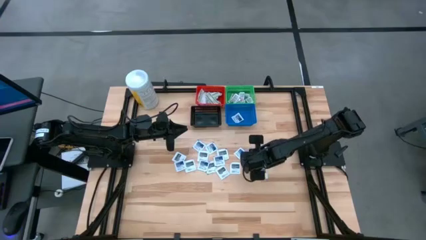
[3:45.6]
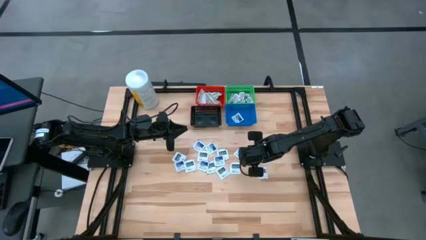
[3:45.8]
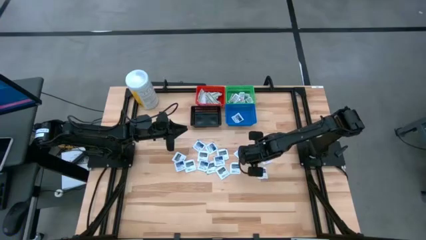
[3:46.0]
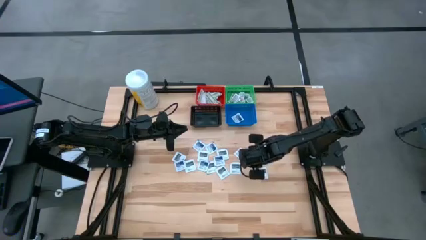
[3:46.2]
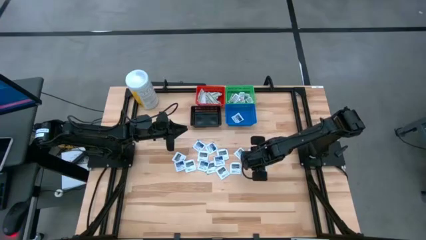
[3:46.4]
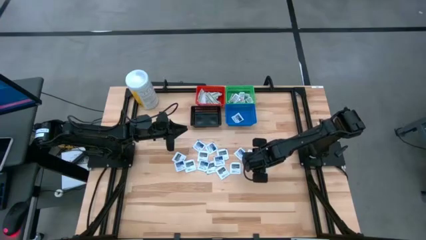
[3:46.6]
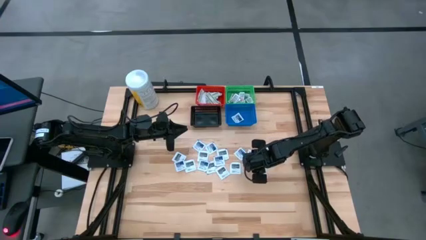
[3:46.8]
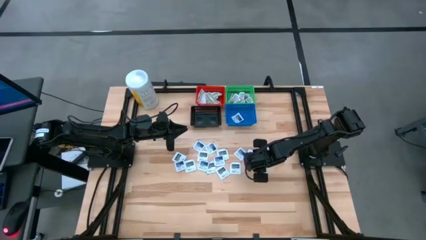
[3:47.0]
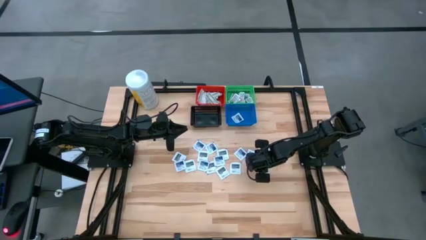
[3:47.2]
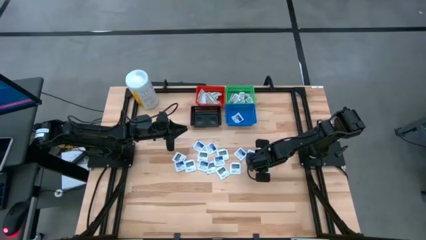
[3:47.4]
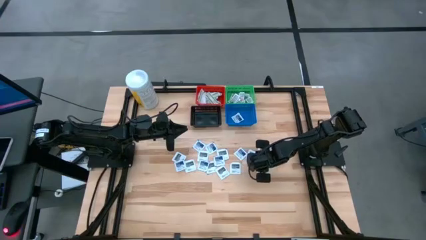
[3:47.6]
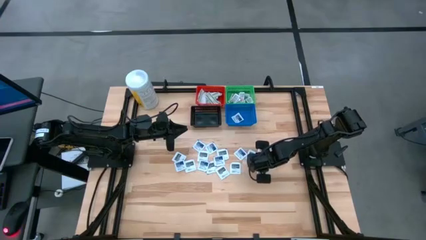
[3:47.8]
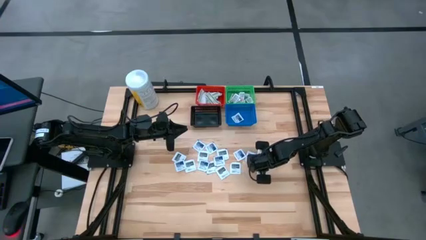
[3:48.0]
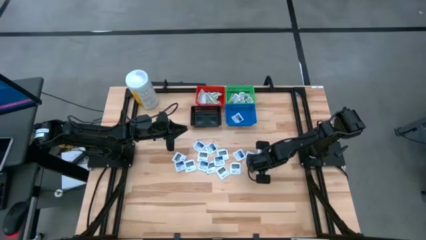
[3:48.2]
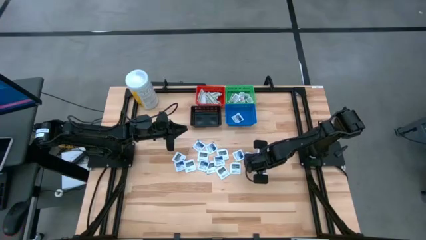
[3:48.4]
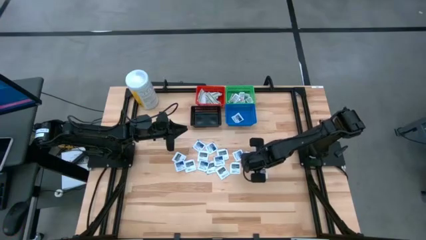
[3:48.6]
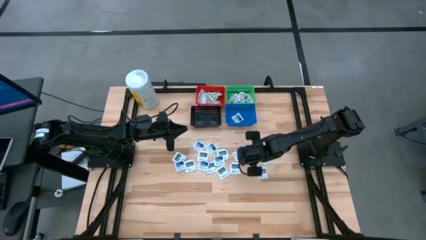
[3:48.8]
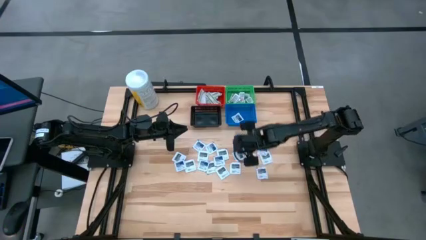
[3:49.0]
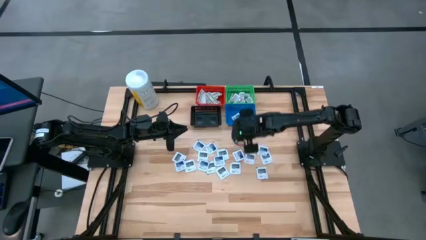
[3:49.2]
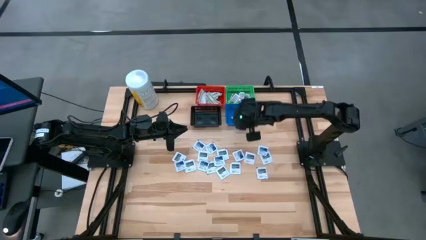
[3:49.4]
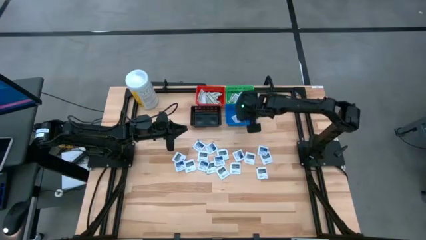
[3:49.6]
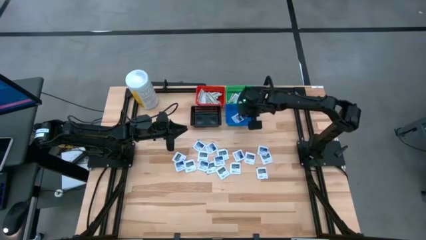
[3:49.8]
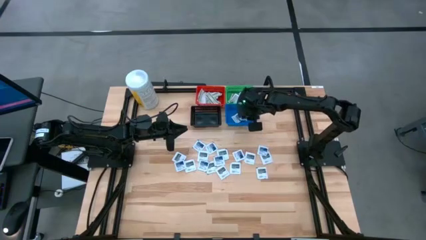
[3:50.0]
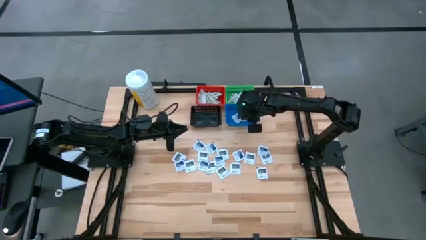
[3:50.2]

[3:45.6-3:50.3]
Task: Pick & Place First Aid Supplies
Put the alcohol pad into the blue basket

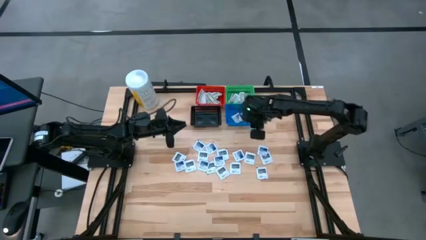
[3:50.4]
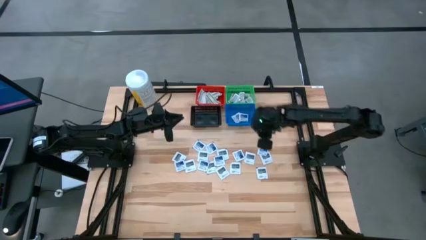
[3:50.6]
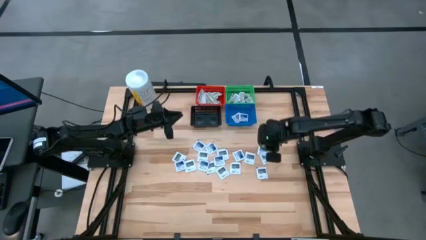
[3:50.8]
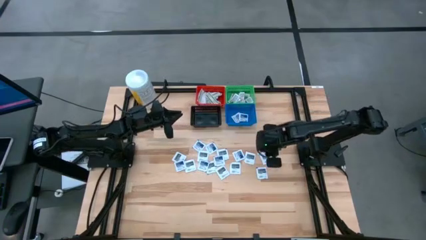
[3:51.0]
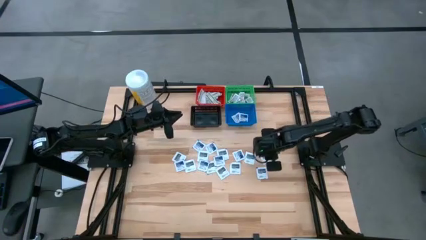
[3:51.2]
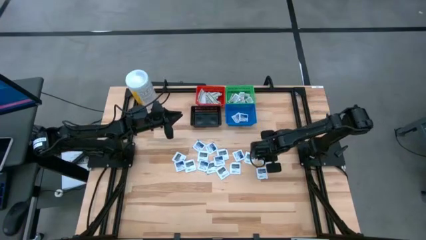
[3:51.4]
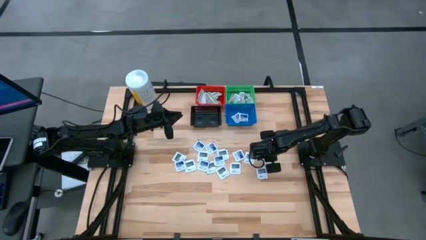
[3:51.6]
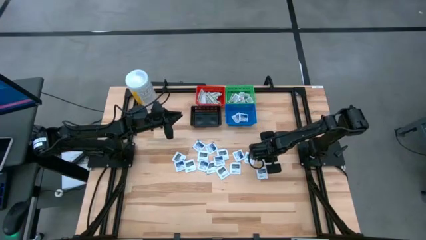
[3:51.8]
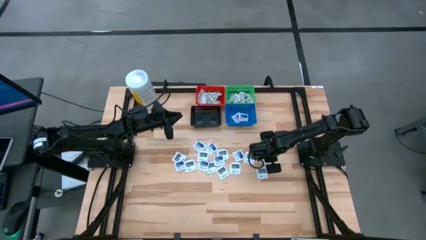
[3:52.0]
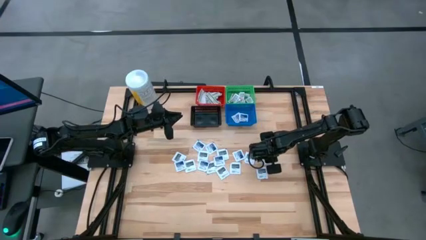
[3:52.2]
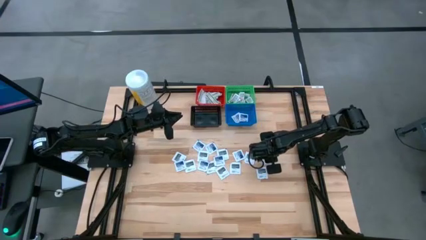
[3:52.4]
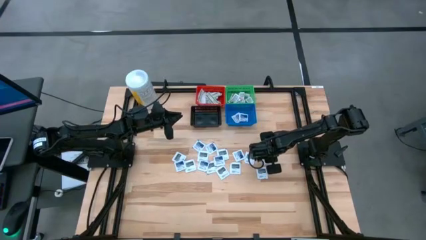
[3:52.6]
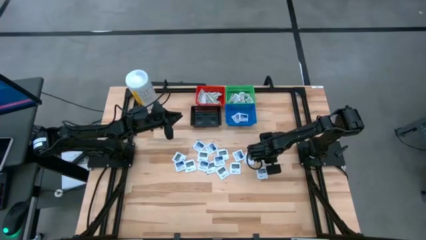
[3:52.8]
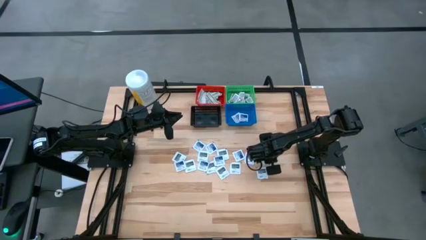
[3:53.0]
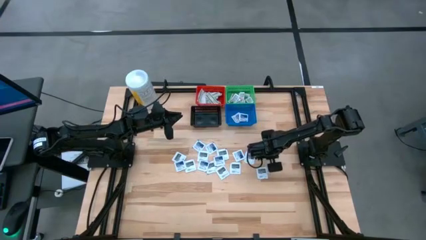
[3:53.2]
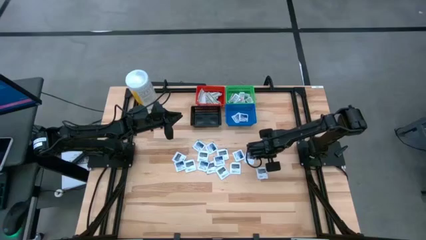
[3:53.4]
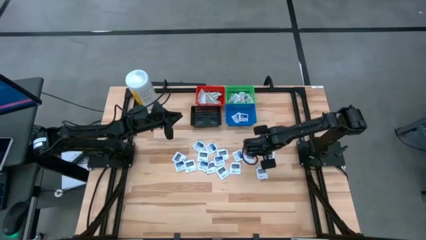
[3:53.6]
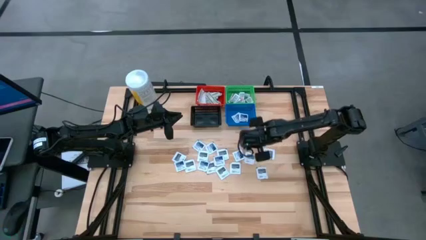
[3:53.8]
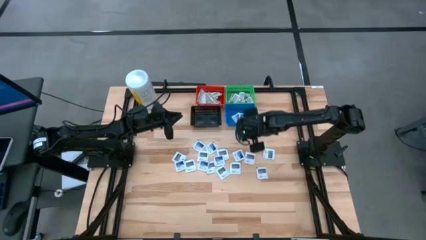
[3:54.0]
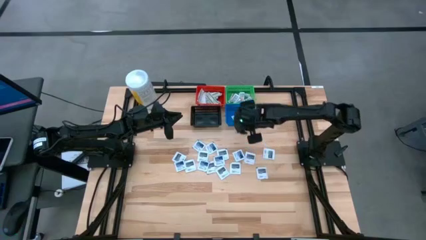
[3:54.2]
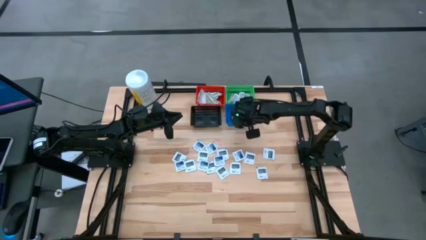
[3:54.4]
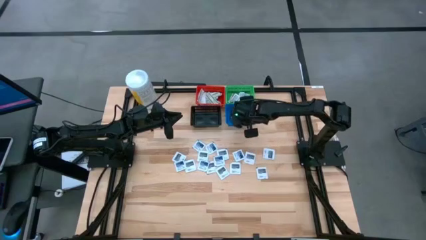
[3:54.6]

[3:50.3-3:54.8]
Put the alcohol pad into the blue basket

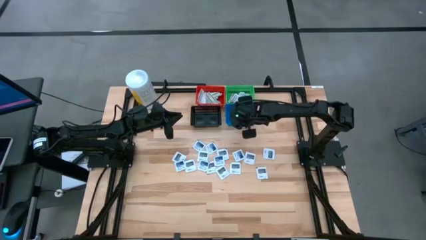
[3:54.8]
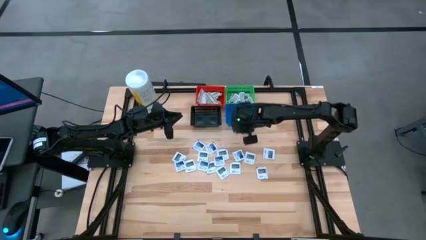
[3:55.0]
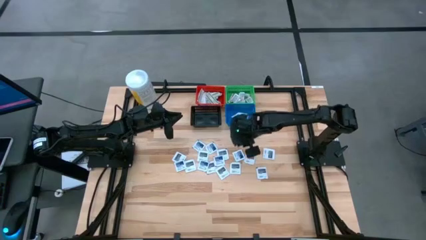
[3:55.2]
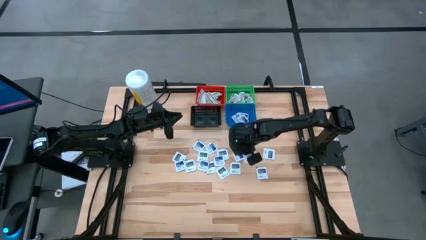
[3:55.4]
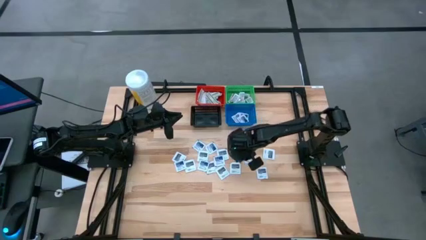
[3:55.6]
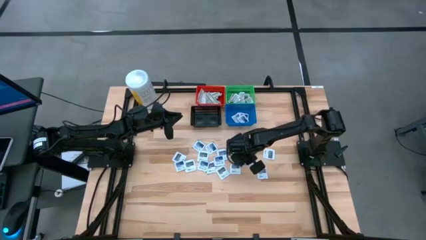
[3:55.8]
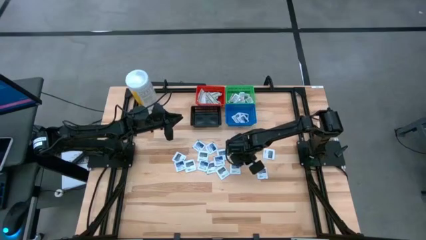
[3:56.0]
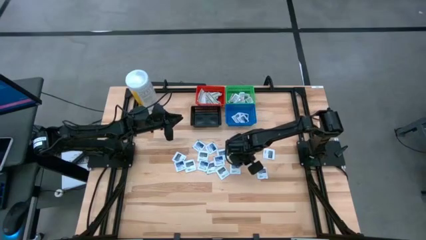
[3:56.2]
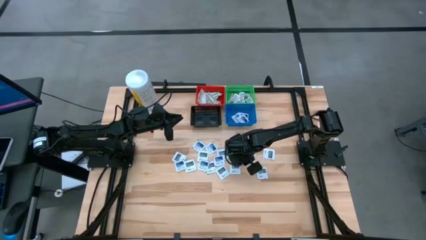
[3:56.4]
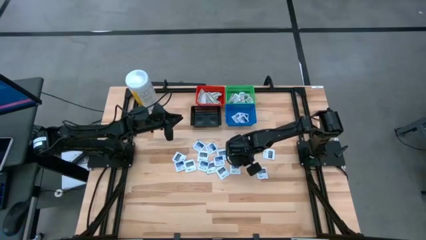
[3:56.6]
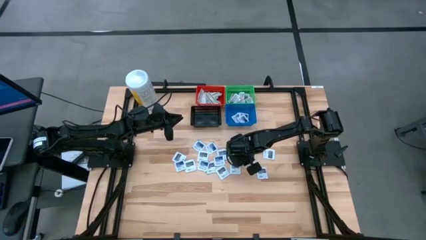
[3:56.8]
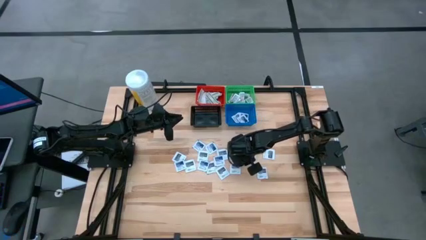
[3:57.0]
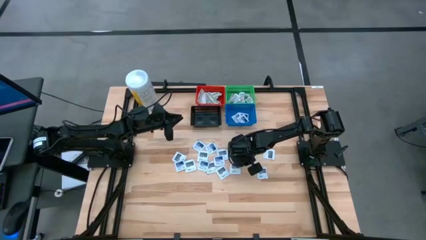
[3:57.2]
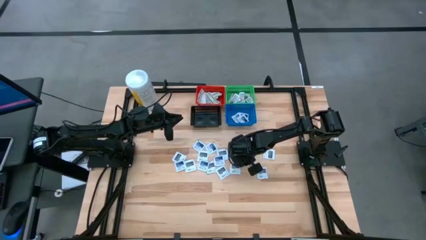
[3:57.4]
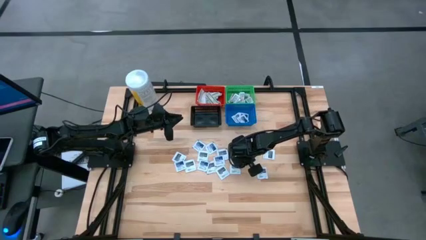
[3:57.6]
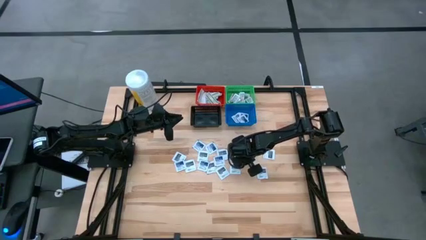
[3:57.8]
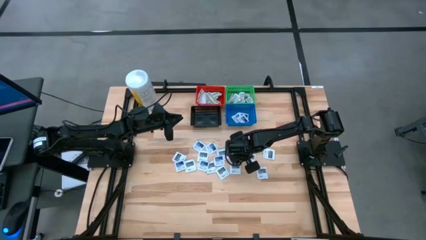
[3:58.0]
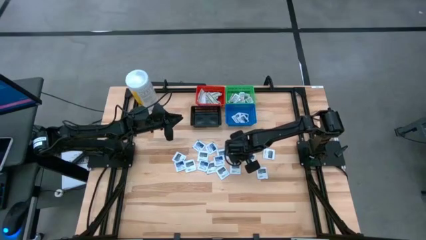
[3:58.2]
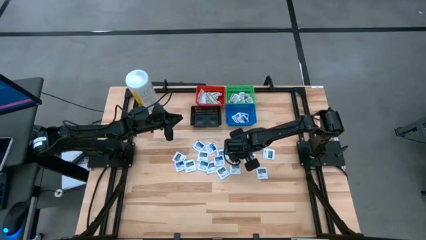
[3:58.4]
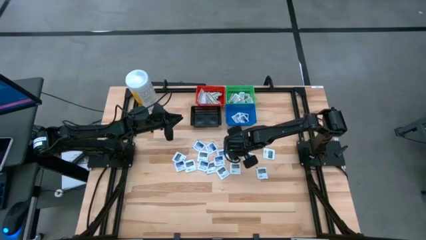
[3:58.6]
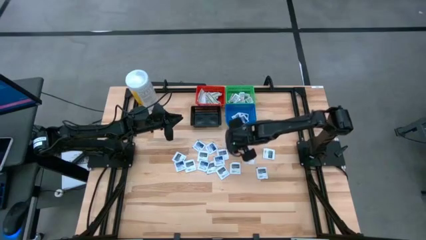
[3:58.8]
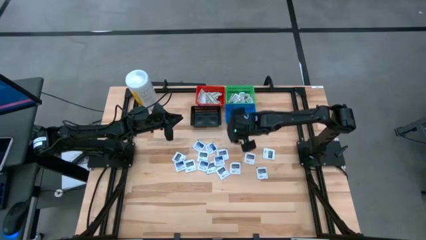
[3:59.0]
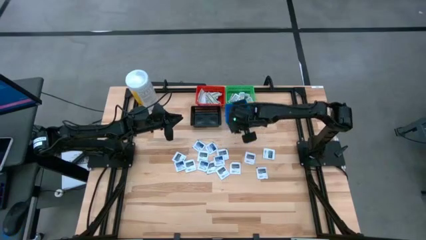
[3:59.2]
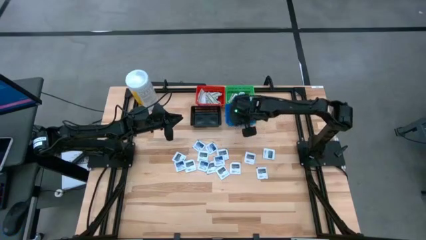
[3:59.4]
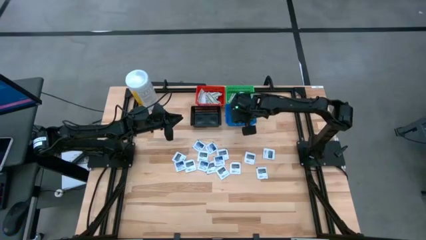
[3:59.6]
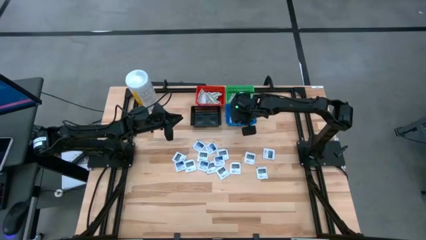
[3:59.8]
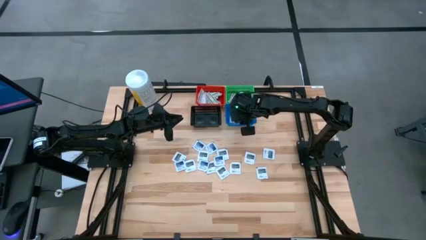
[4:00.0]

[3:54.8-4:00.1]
Put the alcohol pad into the blue basket

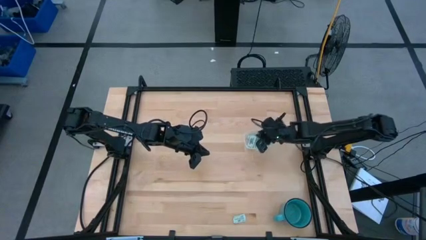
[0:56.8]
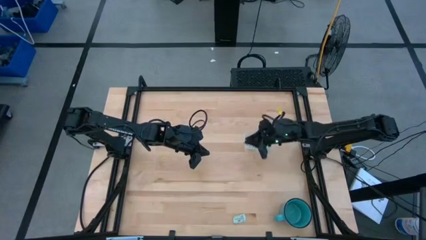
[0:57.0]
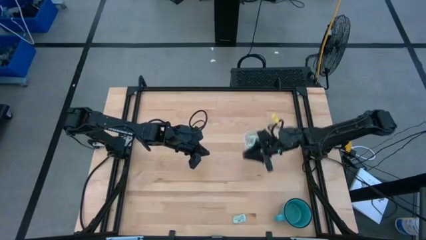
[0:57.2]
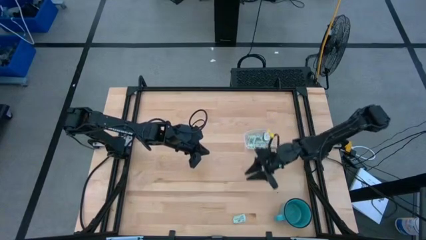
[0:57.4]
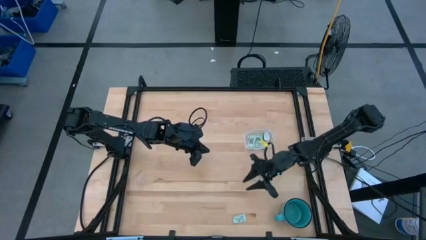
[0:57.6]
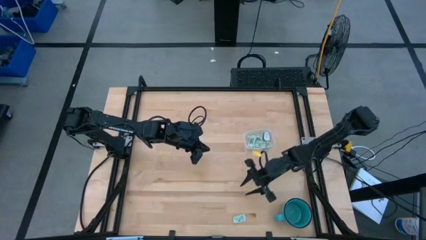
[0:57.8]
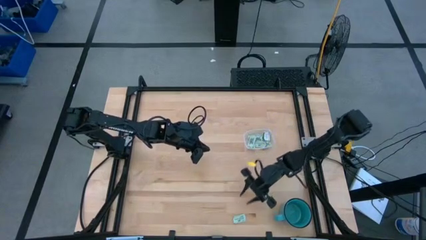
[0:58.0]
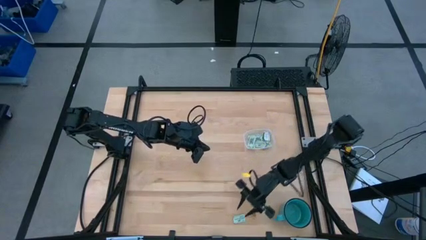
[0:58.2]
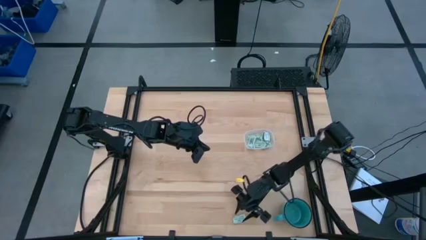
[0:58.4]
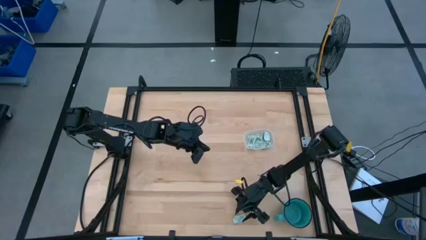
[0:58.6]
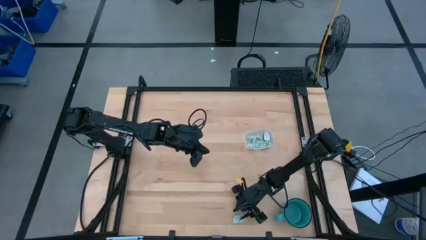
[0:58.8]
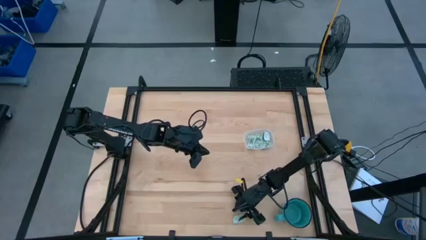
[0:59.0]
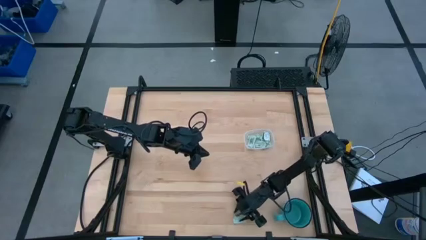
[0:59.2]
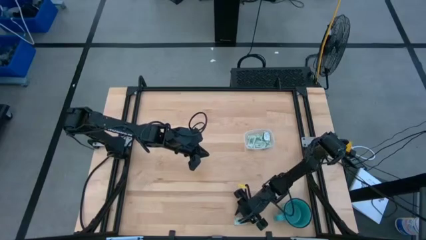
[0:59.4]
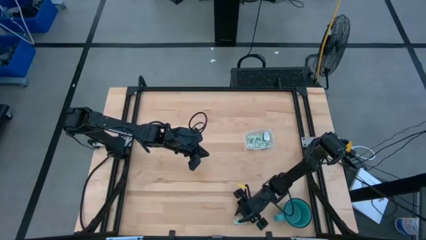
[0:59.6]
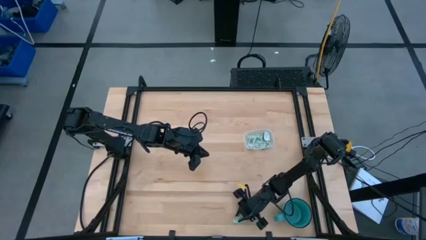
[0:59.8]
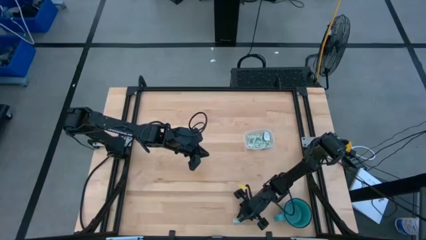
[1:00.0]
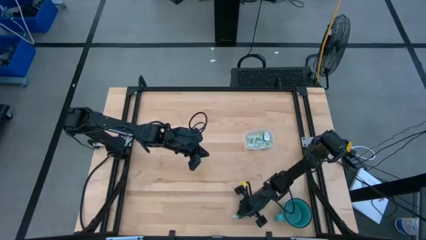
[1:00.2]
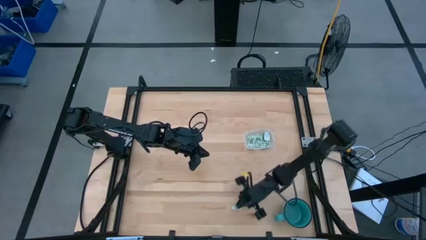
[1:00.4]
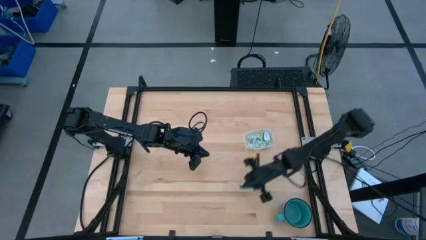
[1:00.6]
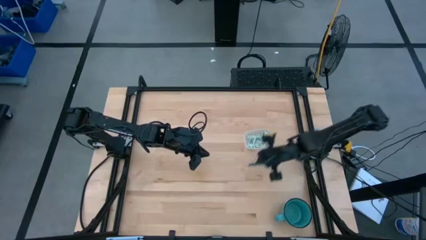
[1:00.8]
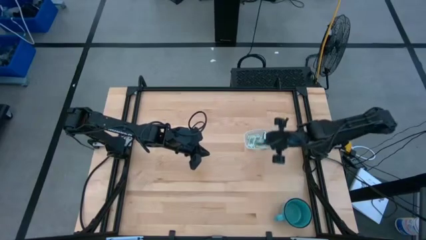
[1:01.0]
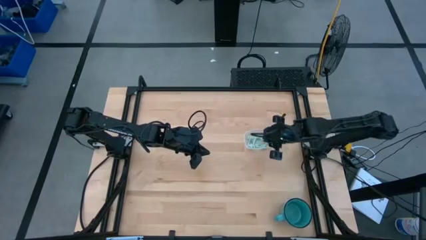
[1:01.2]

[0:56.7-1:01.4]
Task: Pick and place Stevia / Truvia into bins
Put the green stevia packet into the transparent bin
